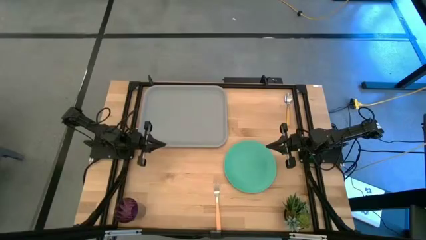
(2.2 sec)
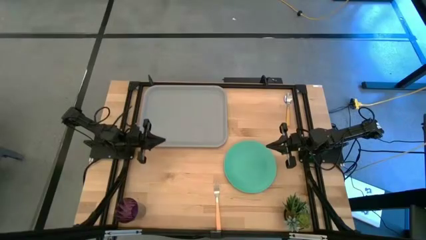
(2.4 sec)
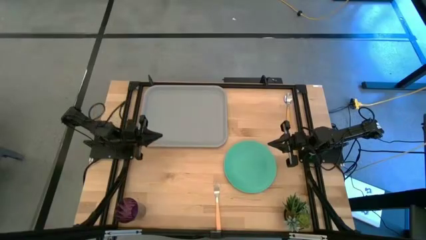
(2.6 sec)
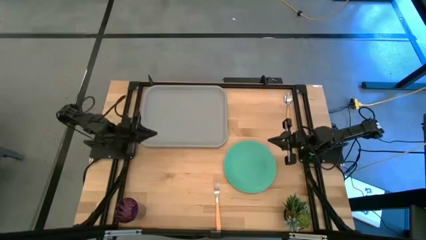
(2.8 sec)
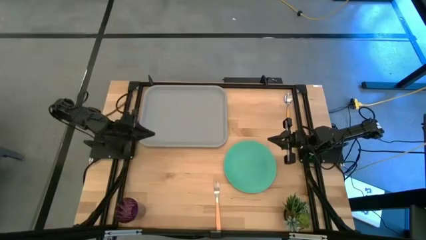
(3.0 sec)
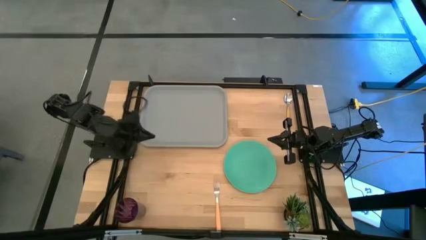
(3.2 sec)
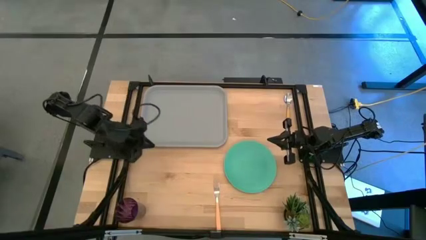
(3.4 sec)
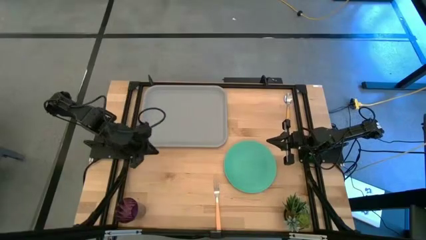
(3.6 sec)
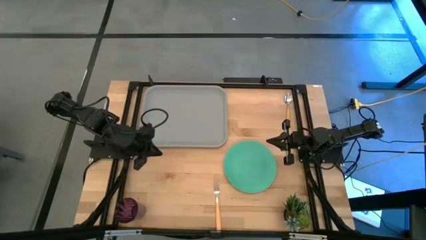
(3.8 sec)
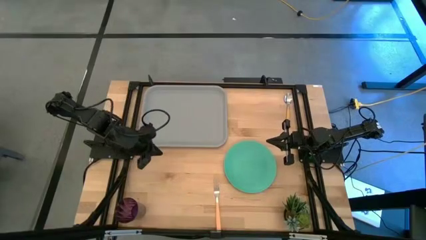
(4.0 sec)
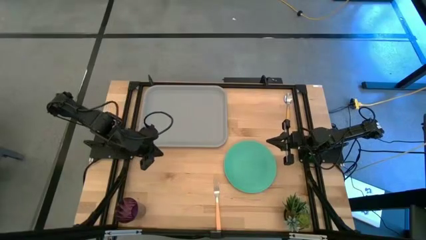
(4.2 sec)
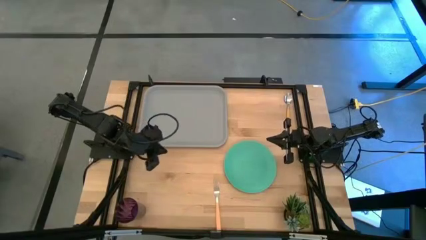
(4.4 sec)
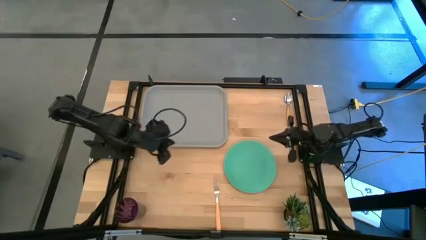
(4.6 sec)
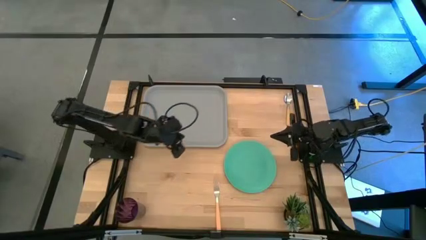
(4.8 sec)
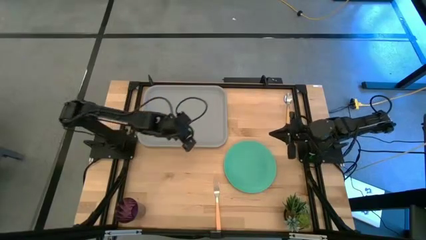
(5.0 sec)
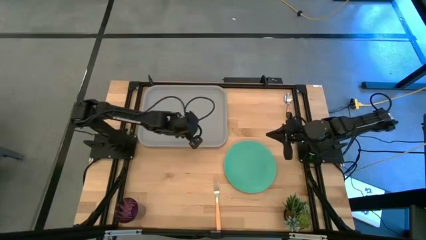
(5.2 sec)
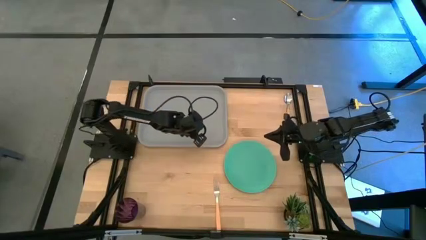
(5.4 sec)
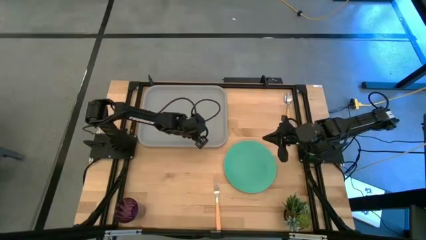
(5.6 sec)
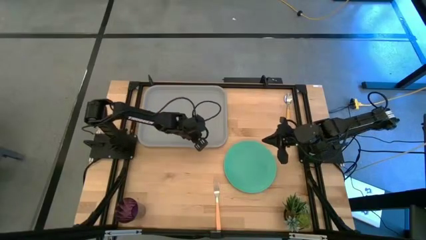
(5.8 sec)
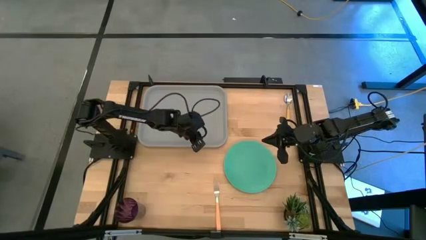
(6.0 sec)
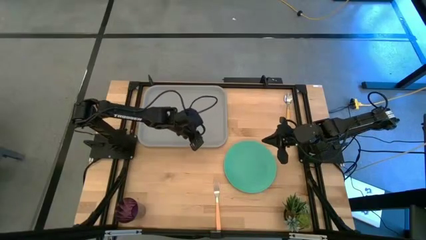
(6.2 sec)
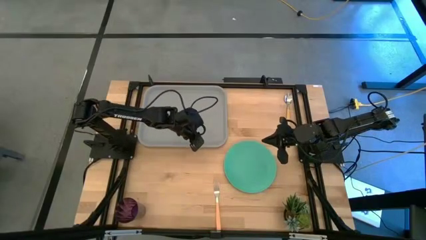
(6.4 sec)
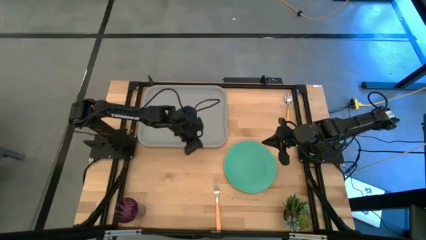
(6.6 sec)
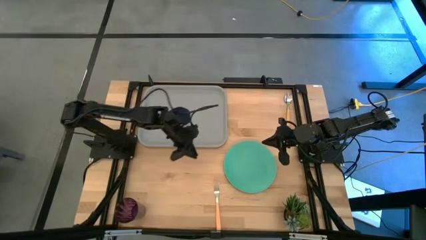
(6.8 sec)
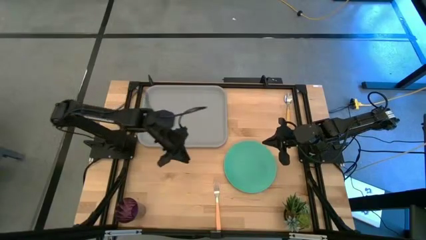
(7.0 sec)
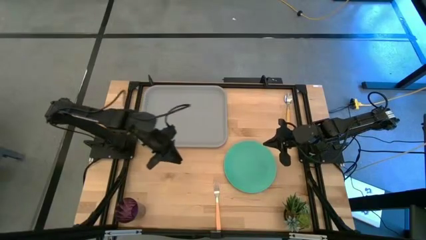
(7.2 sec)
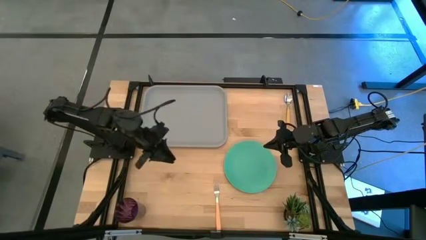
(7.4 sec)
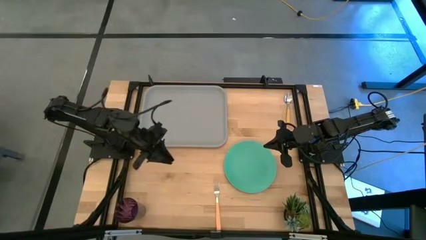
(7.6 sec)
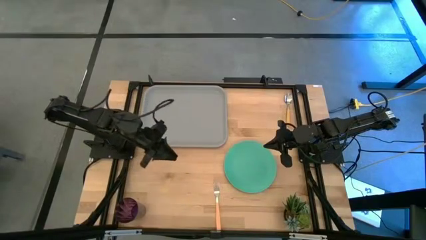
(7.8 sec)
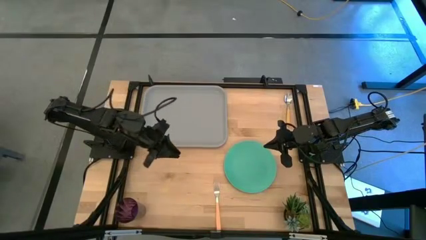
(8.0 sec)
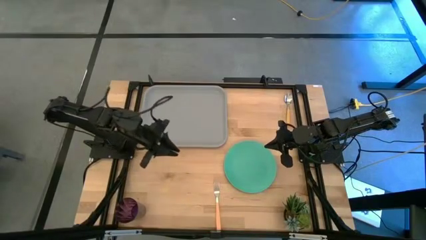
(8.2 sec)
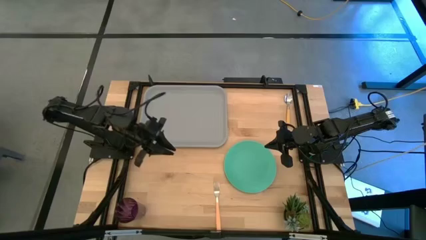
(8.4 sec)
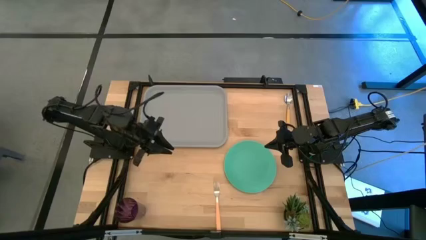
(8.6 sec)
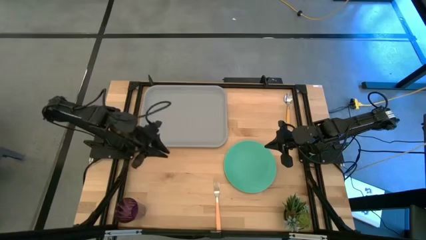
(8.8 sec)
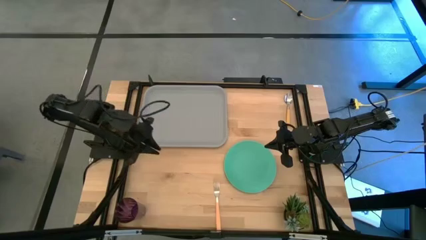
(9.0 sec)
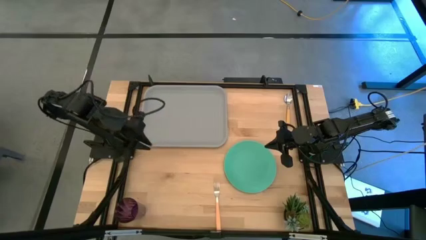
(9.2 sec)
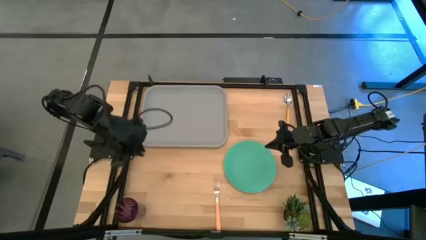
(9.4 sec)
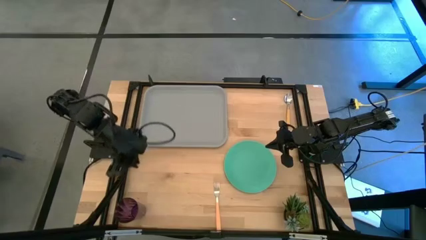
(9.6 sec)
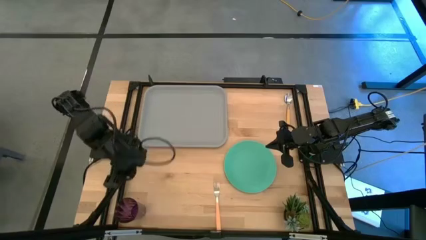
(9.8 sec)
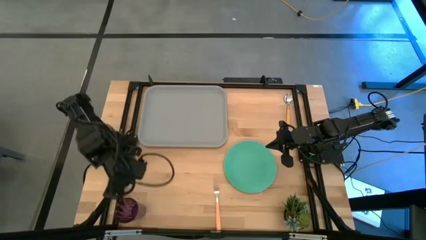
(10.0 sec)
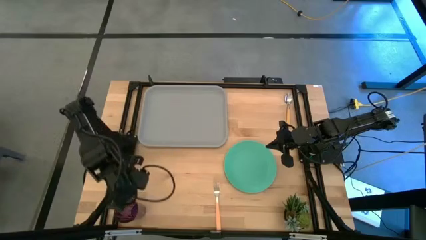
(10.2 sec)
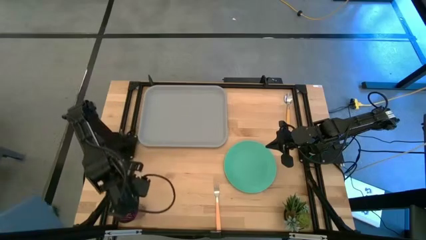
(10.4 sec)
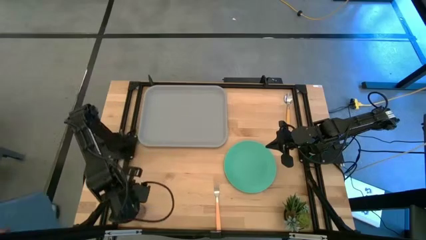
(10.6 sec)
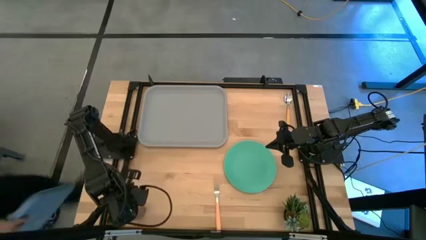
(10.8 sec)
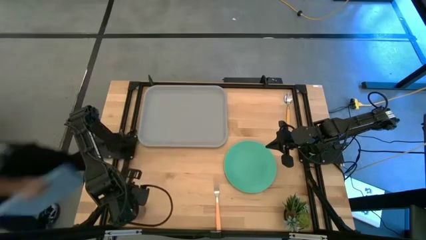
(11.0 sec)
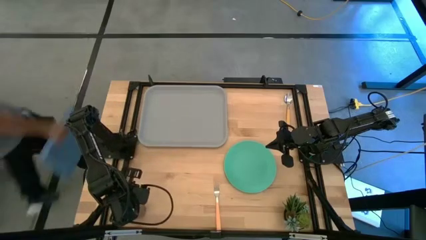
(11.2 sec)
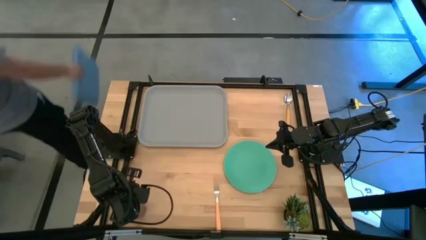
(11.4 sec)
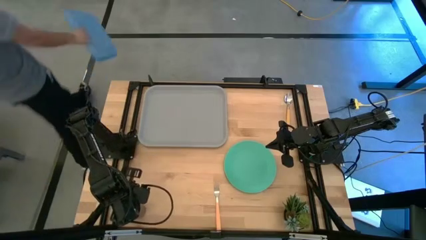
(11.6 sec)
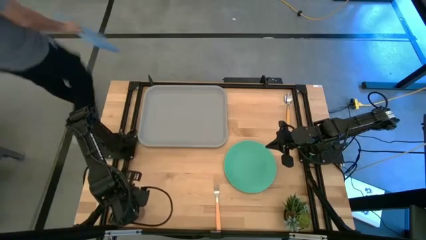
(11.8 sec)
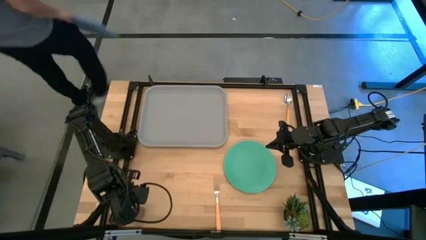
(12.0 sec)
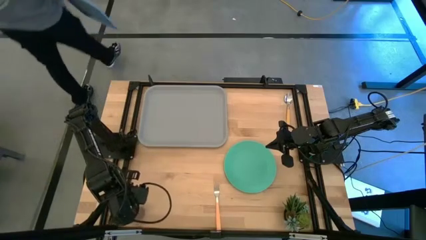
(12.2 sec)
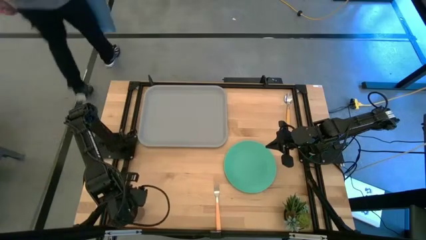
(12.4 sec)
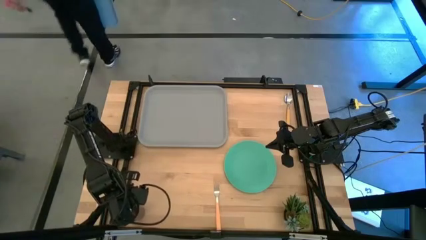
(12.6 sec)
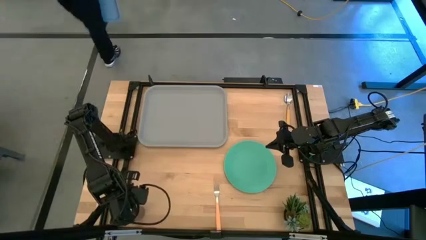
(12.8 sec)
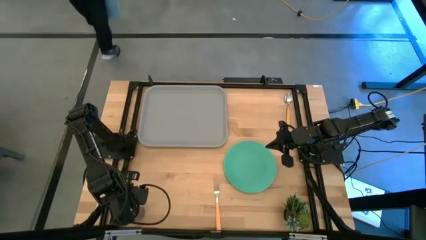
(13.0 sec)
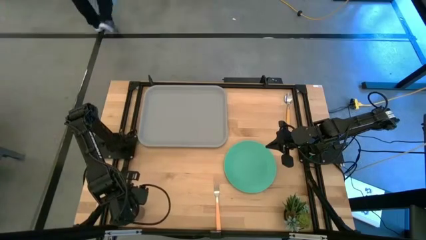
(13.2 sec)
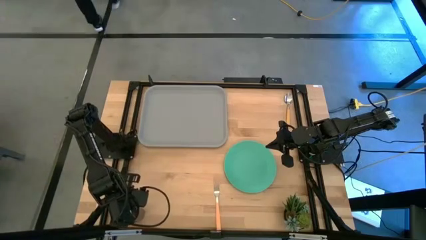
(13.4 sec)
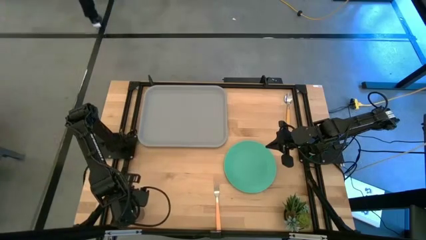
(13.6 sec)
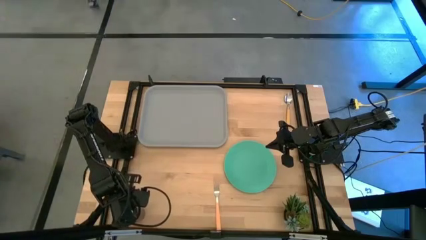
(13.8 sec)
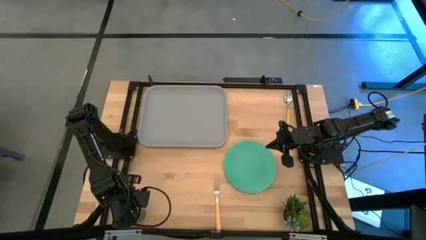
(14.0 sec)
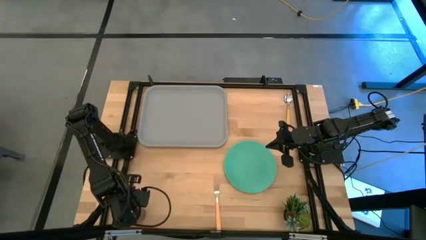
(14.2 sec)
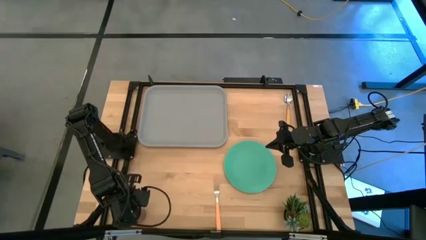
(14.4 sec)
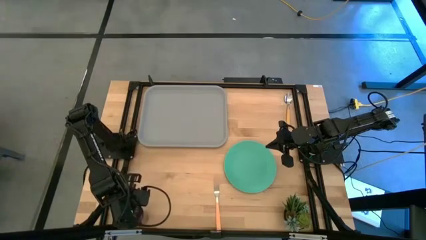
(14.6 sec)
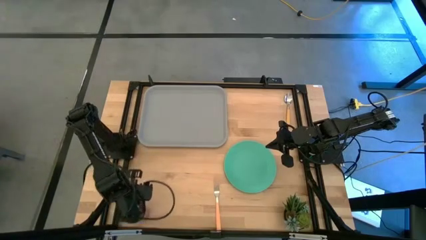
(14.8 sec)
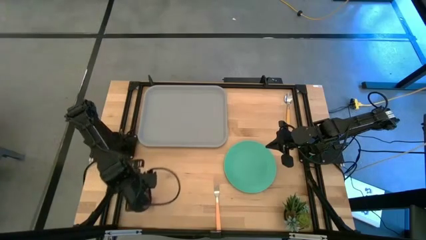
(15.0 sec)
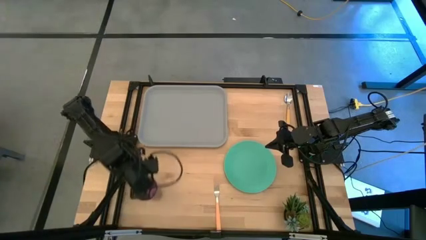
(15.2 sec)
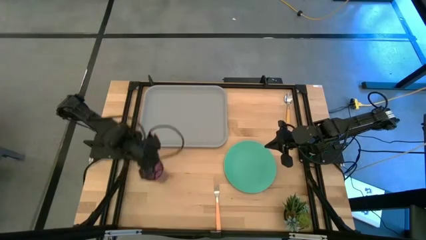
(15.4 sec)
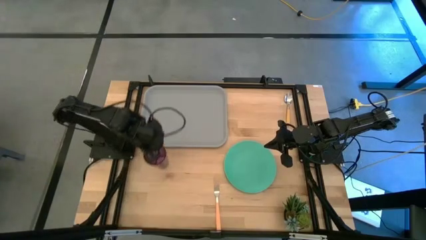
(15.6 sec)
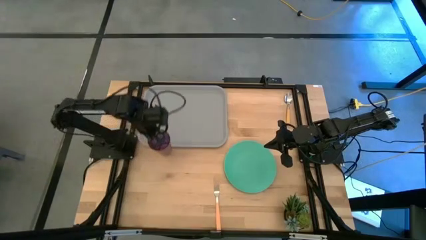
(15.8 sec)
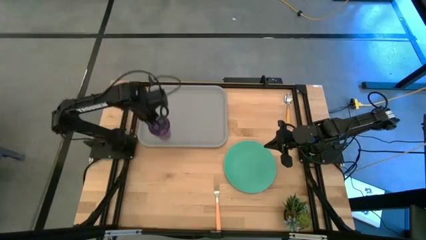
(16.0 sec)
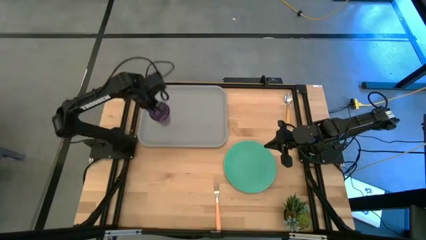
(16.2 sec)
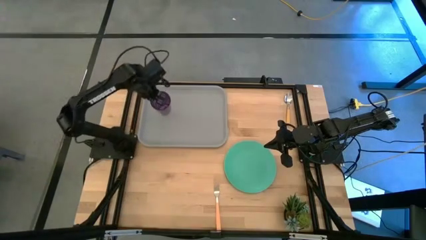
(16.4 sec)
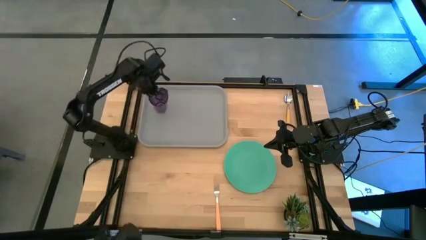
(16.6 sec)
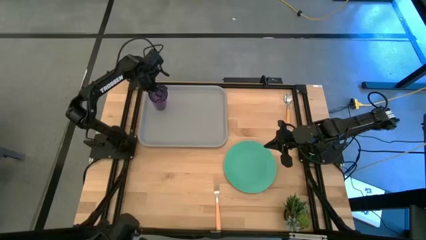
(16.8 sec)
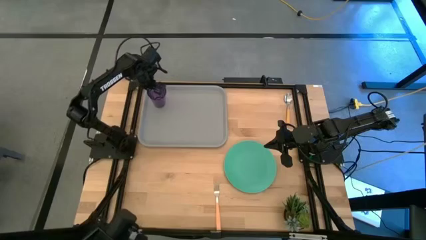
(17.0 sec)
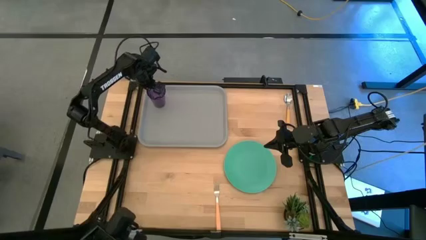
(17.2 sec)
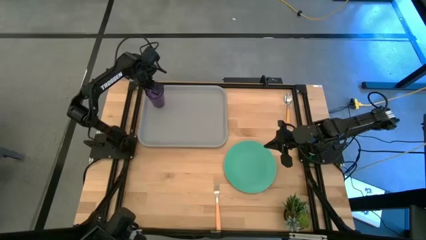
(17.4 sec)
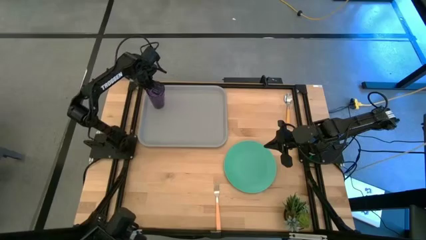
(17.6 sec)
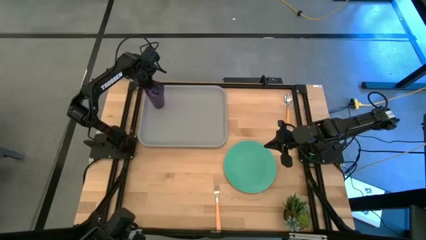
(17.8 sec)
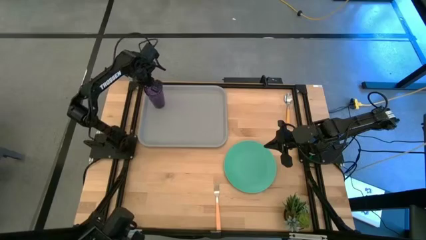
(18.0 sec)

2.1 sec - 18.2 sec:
Task: Pick and place plate/cup/fork/spoon on tray
Put the purple cup on the top left of the gray tray
